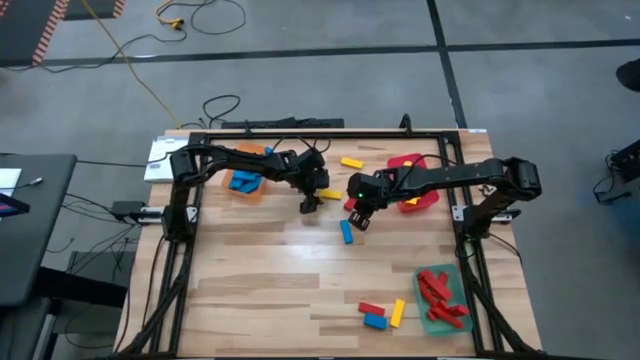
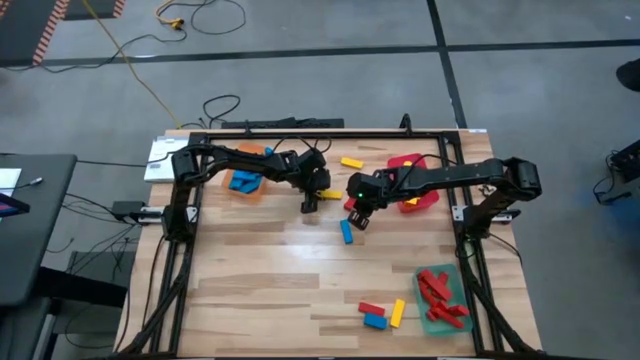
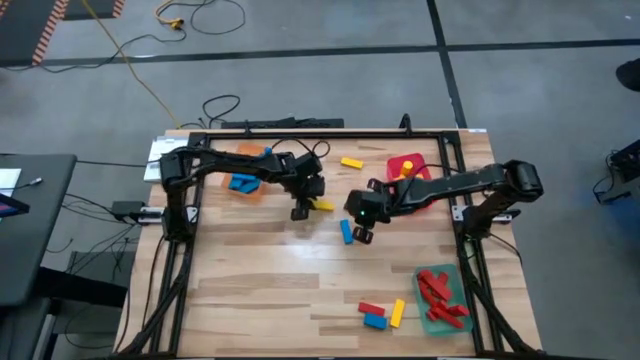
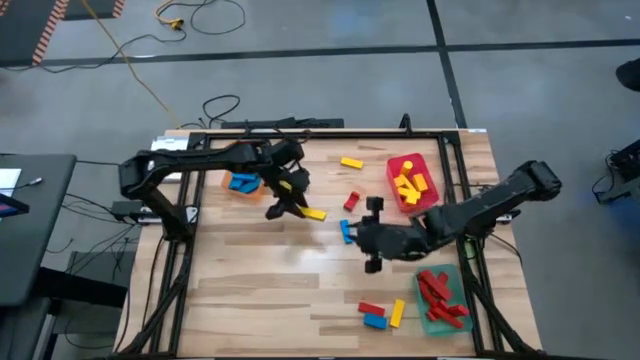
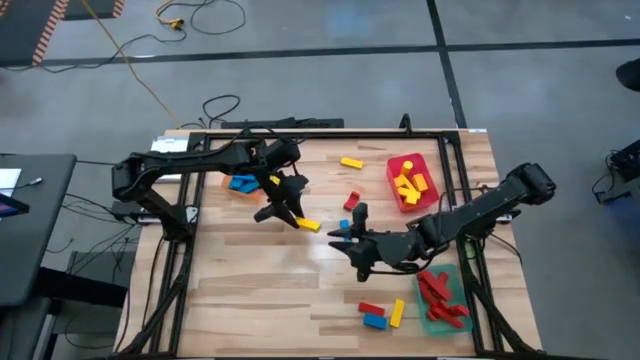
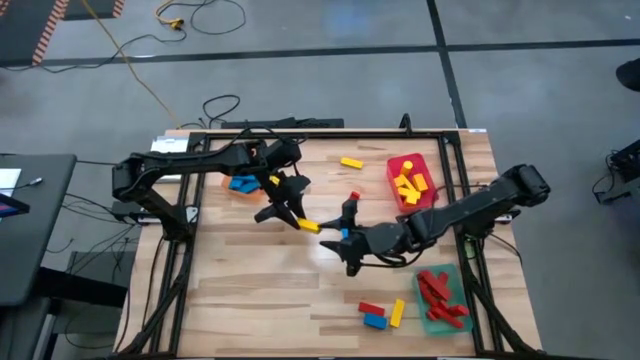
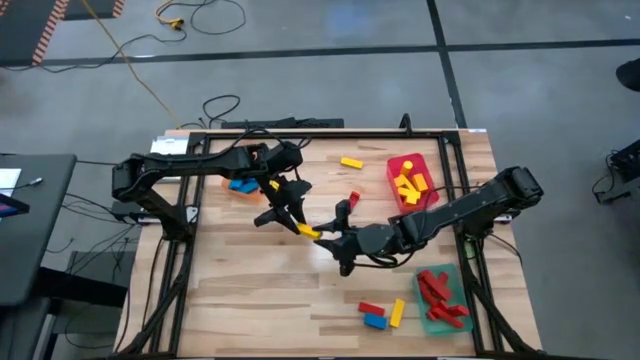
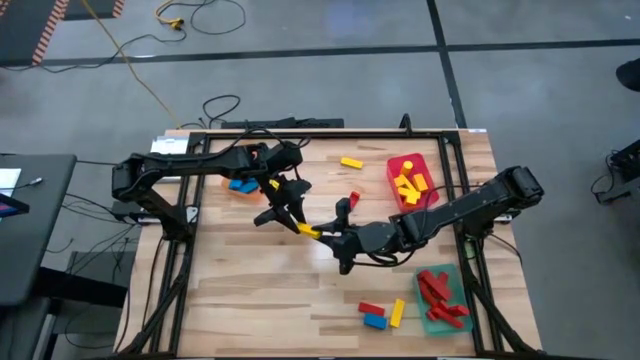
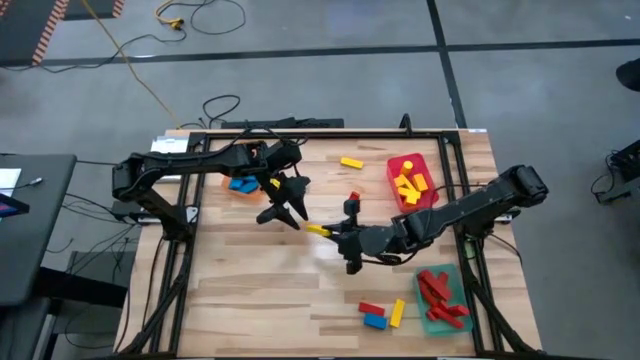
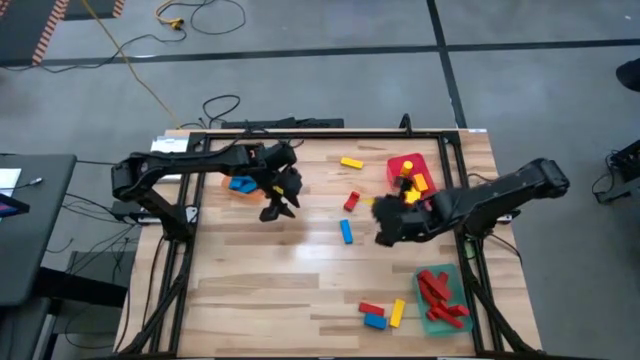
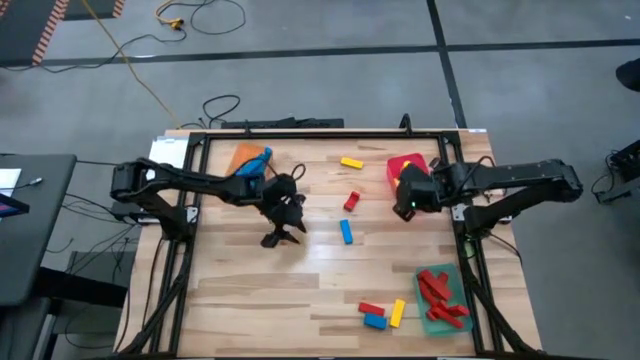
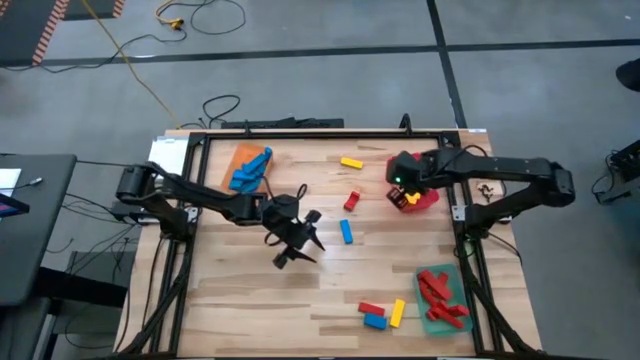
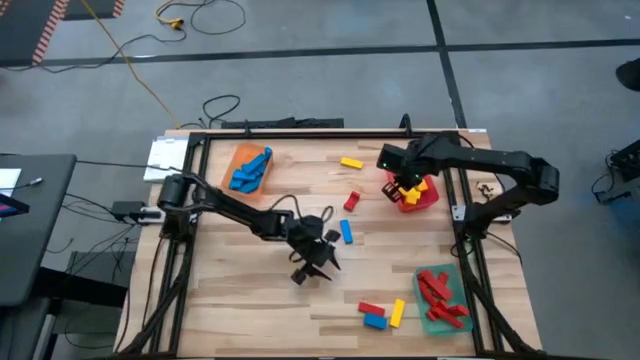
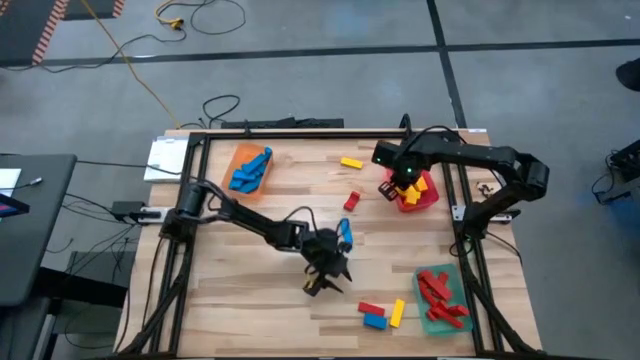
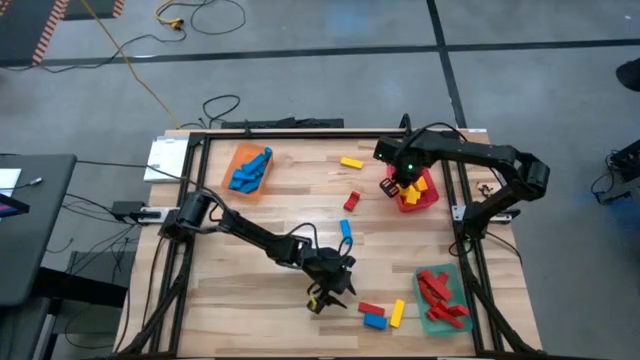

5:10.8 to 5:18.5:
Task: Sort blocks
Put the yellow rectangle block into the red bin

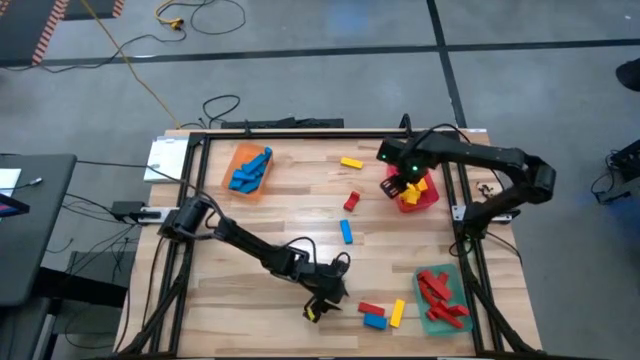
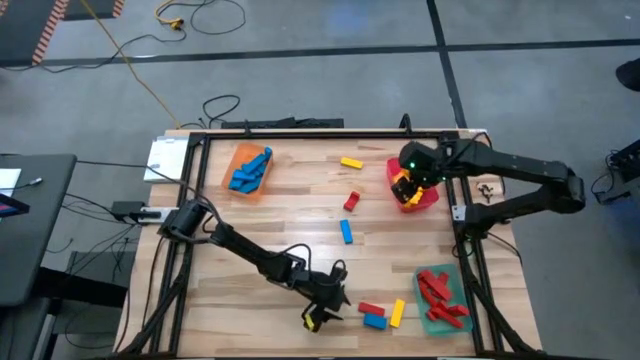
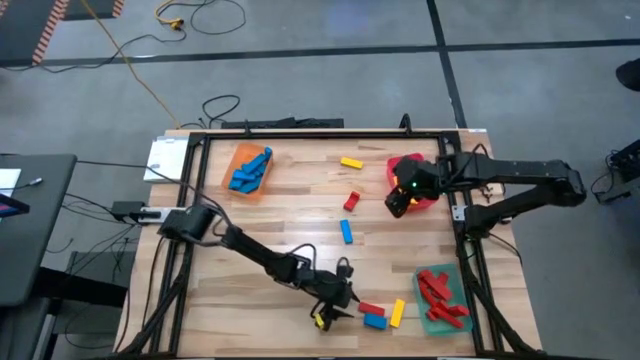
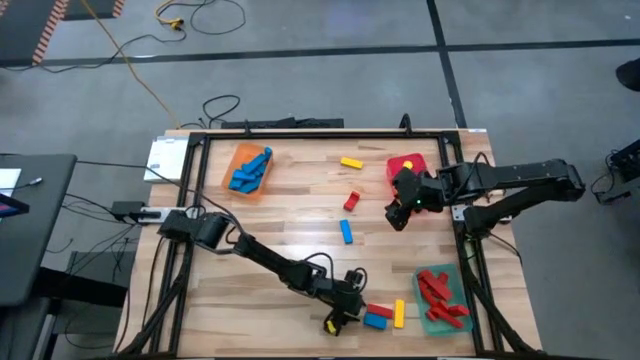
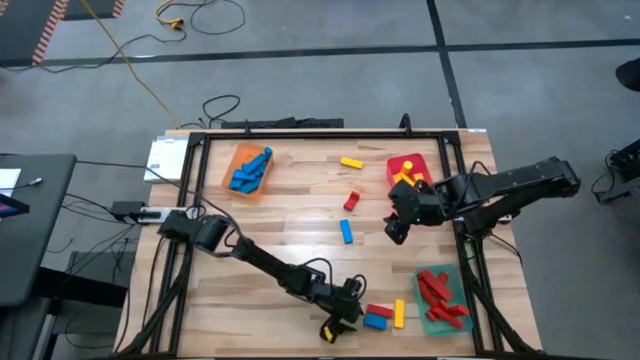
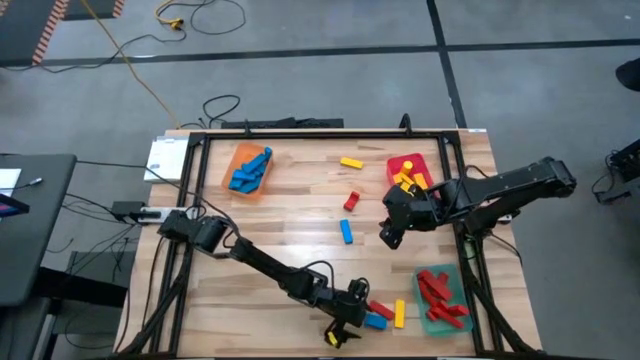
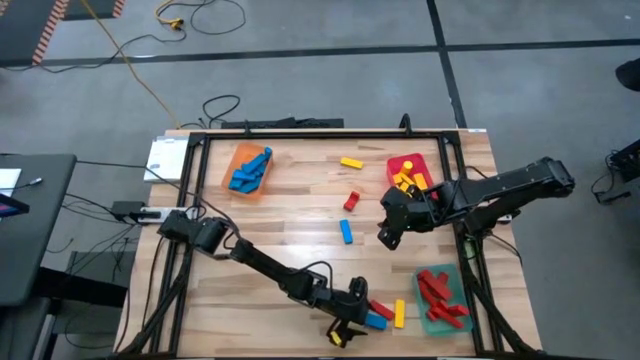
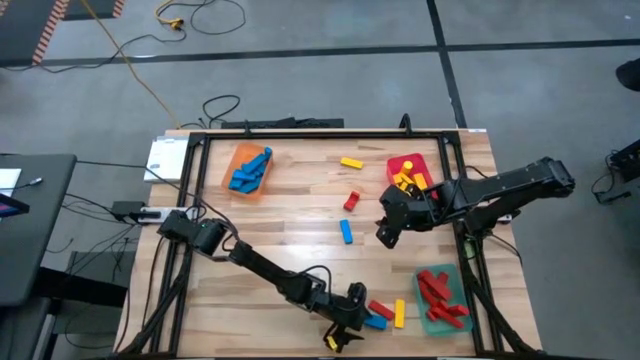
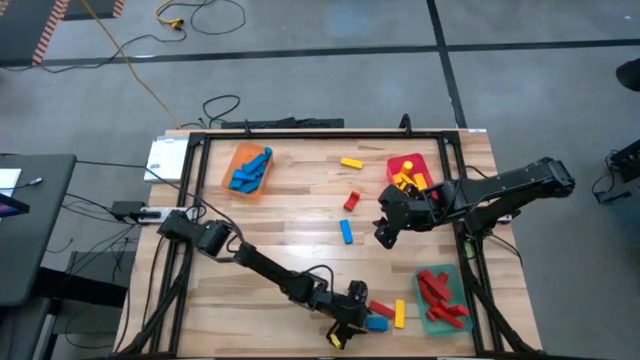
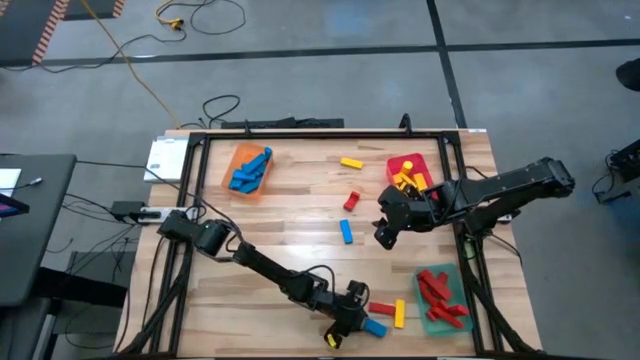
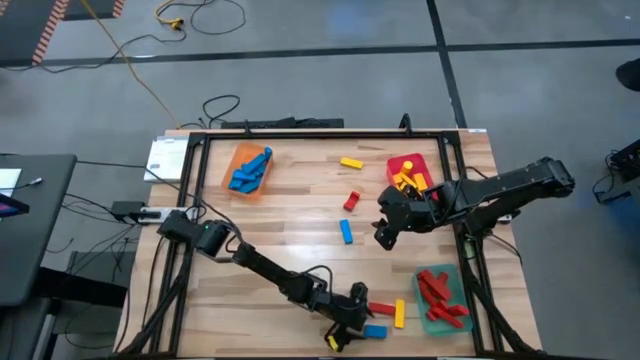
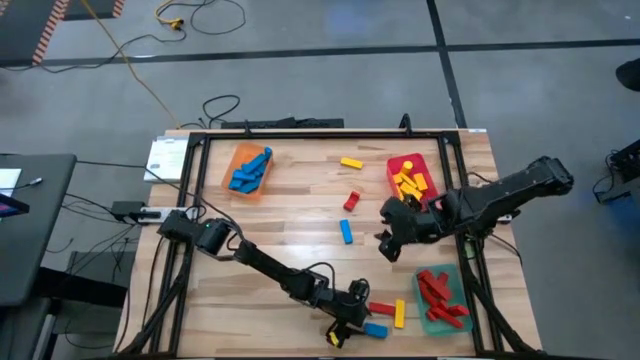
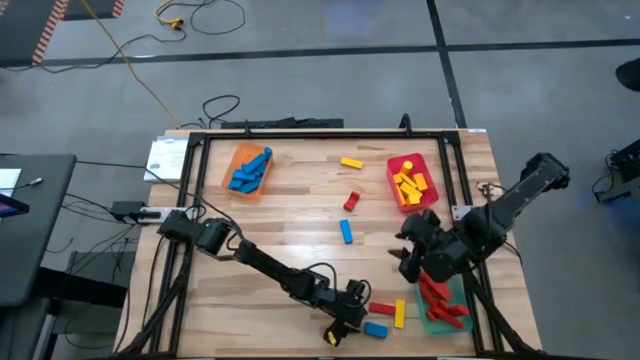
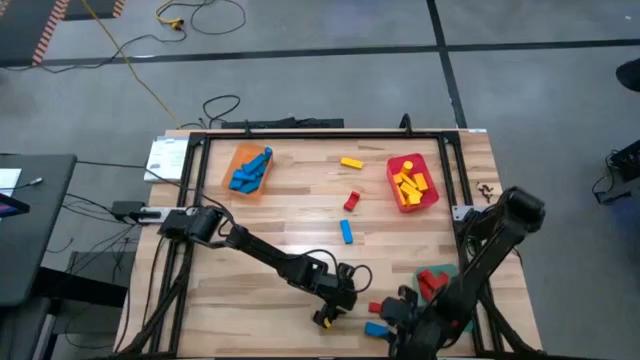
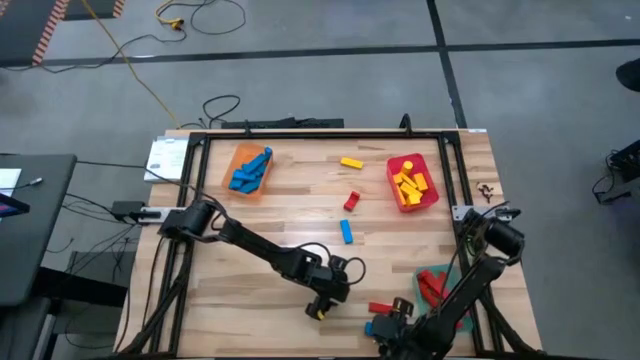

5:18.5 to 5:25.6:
Put the blue rectangle block into the orange bin

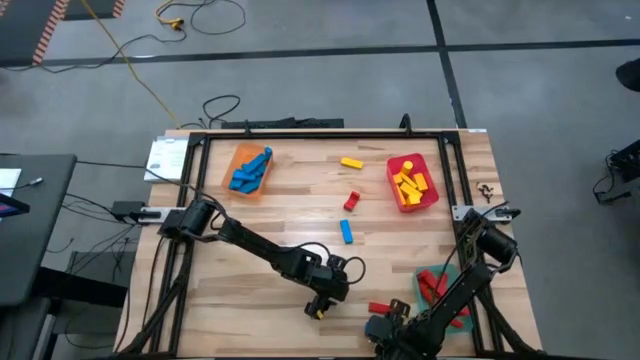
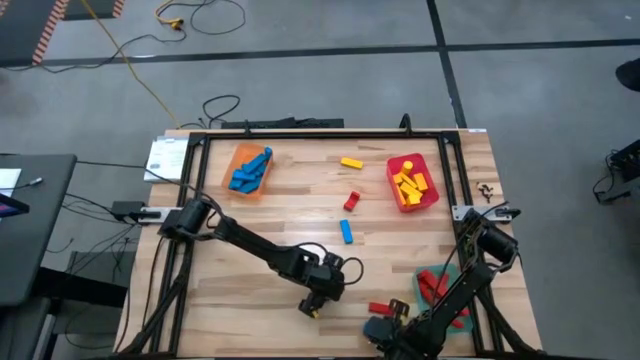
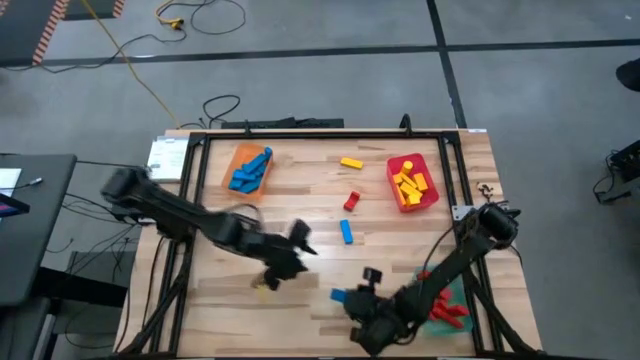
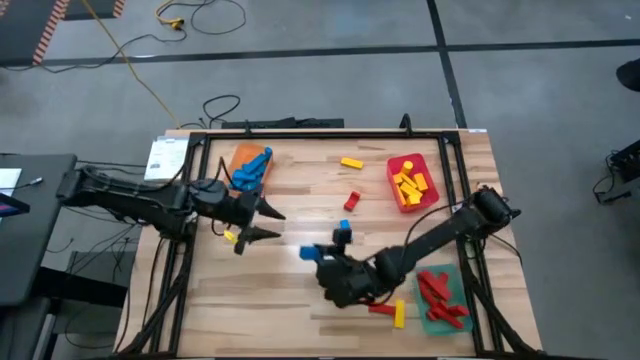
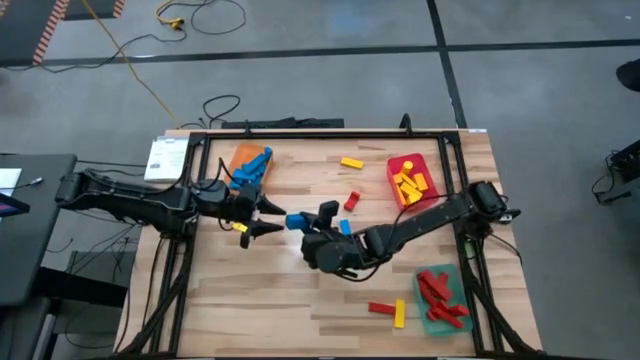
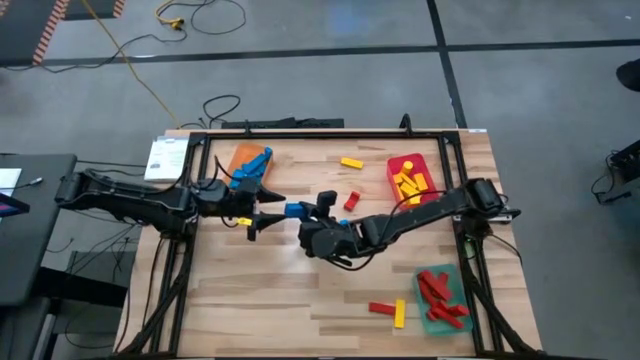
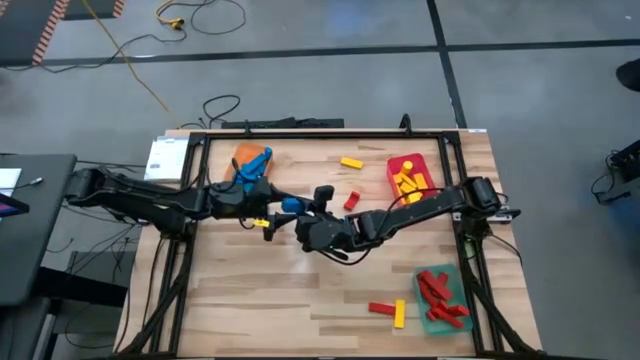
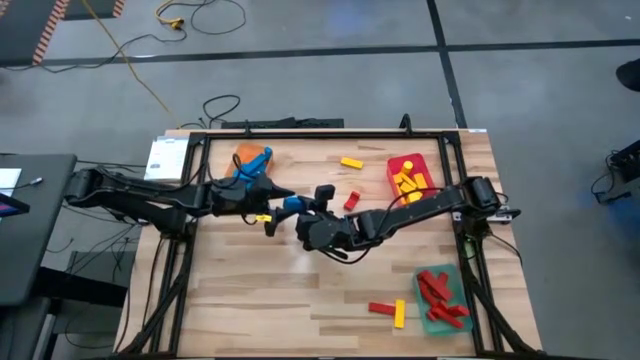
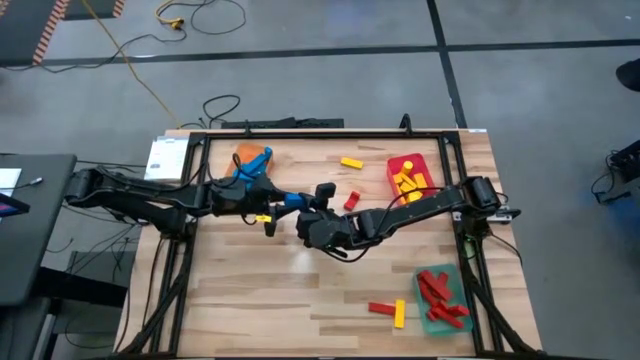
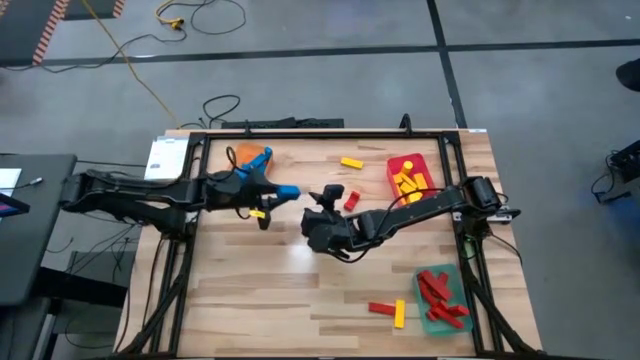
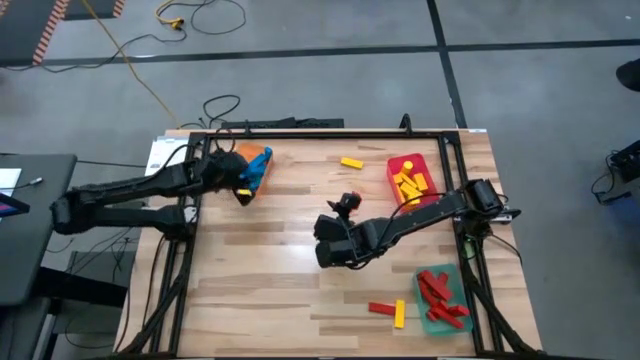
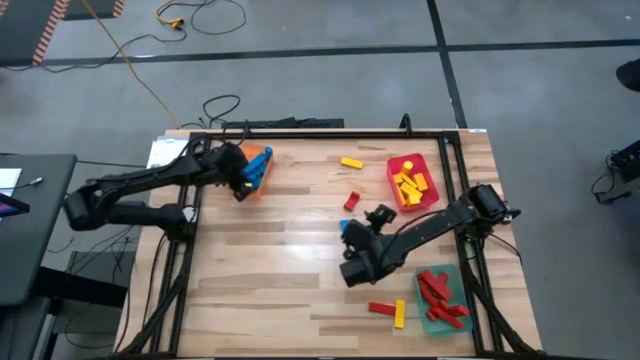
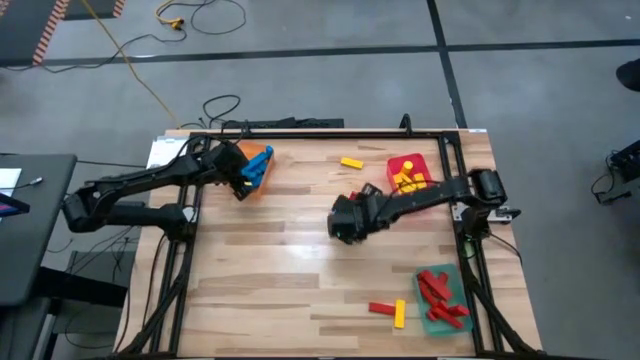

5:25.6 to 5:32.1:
Put the blue rectangle block into the orange bin
